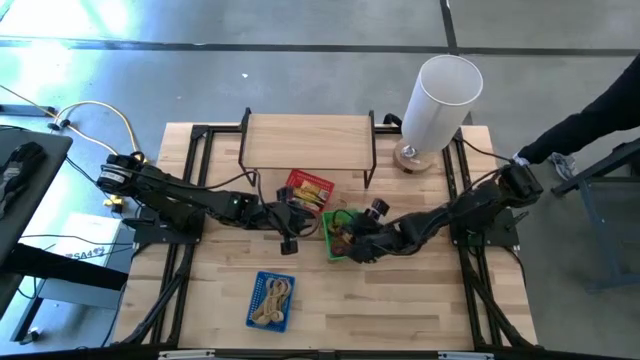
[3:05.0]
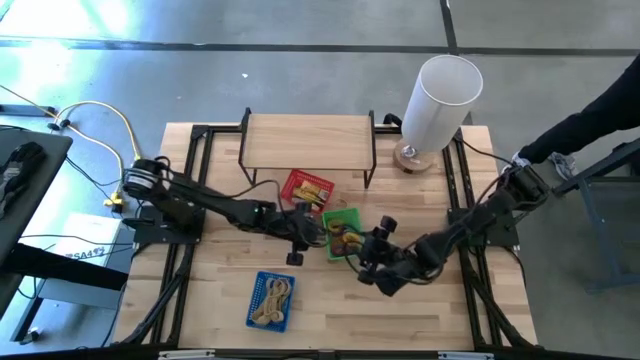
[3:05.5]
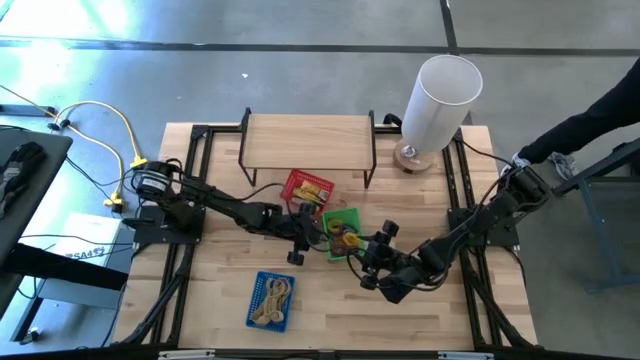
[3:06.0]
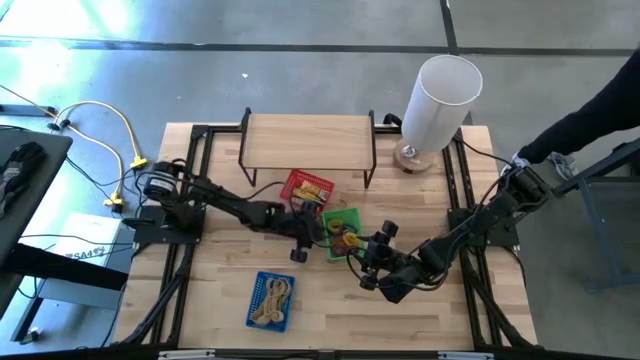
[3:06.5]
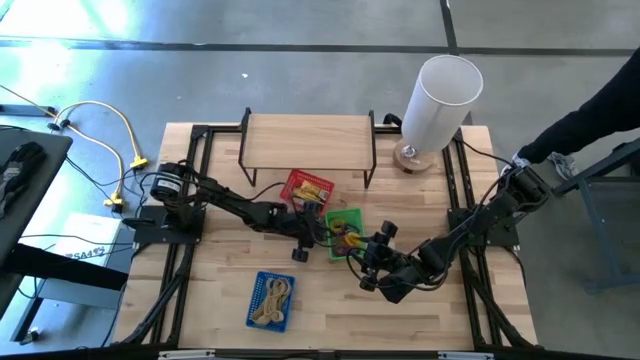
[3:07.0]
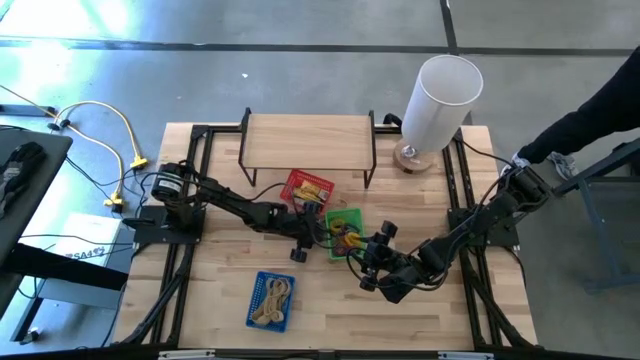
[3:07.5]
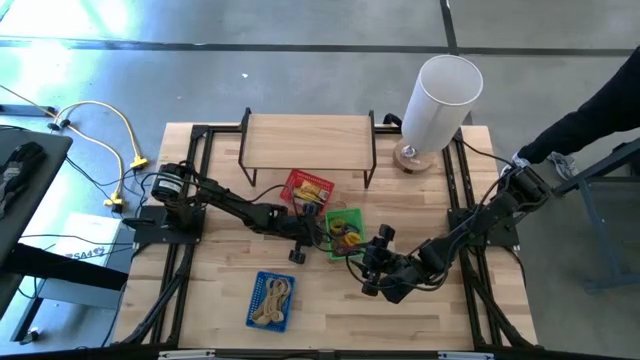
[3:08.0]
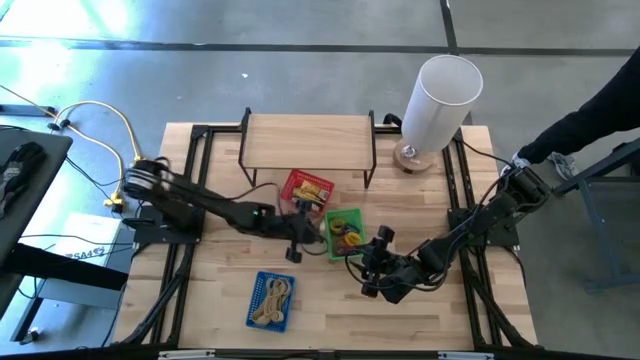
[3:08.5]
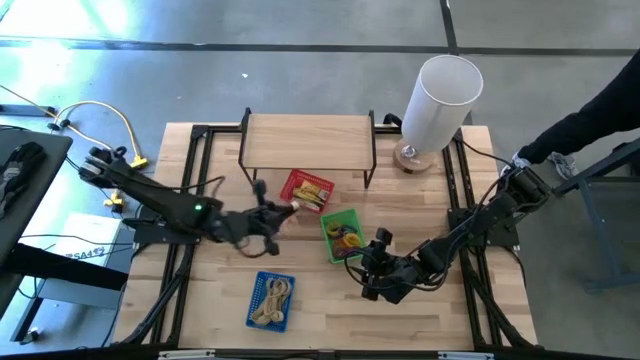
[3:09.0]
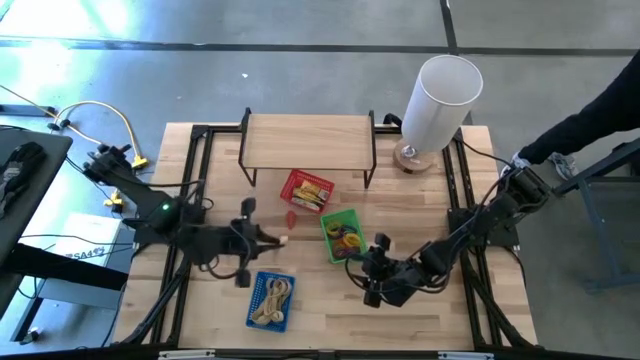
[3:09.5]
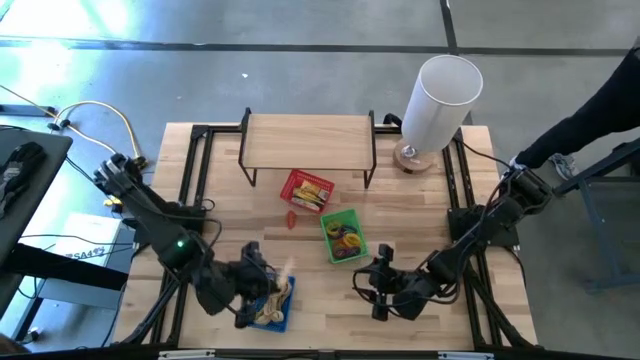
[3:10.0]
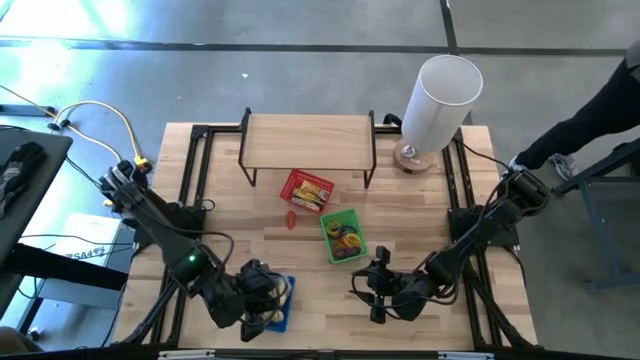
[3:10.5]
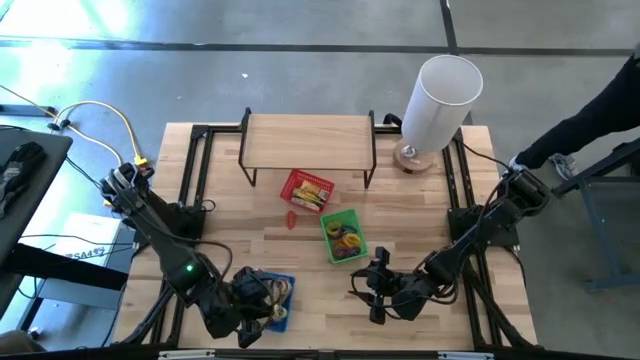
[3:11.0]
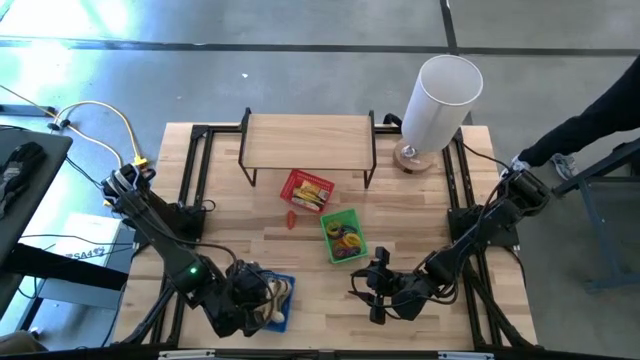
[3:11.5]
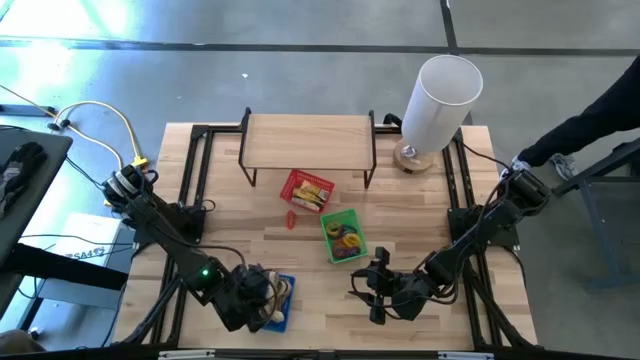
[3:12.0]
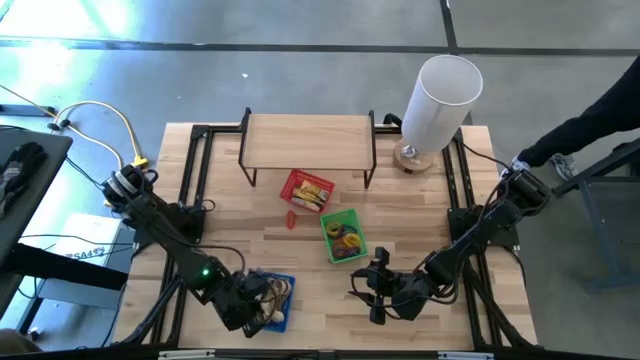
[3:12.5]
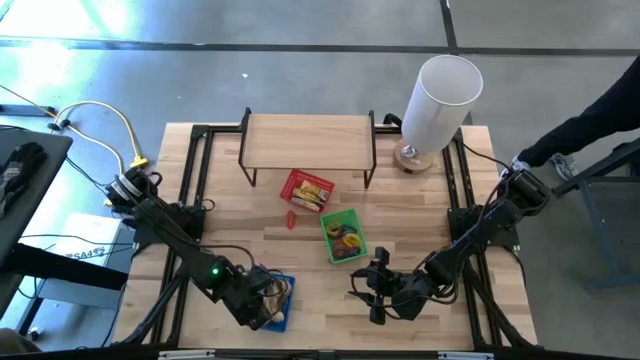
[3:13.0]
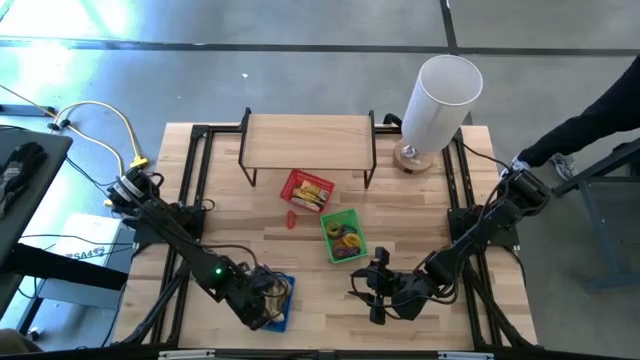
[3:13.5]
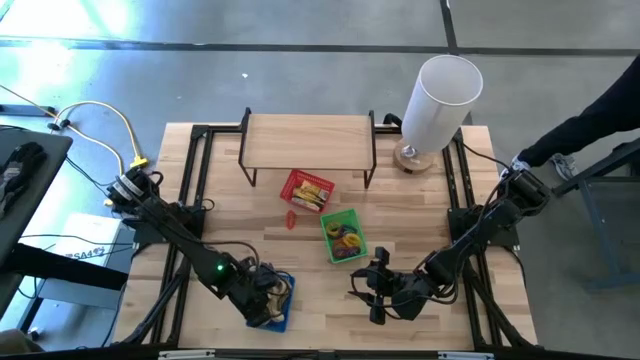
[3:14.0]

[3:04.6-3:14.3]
Task: Pick & Place Office Desk Supplies
Put the brown rubber band into the blue bin

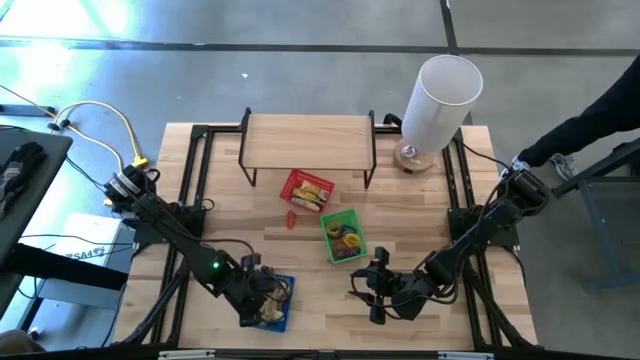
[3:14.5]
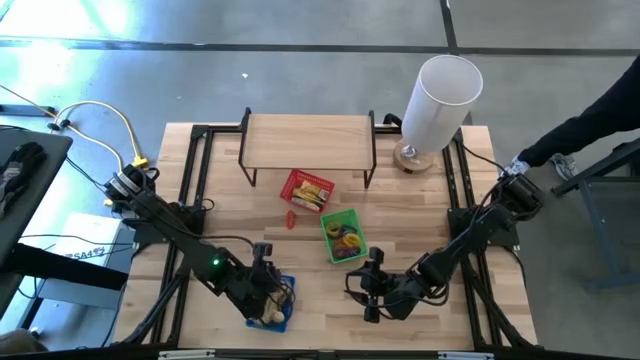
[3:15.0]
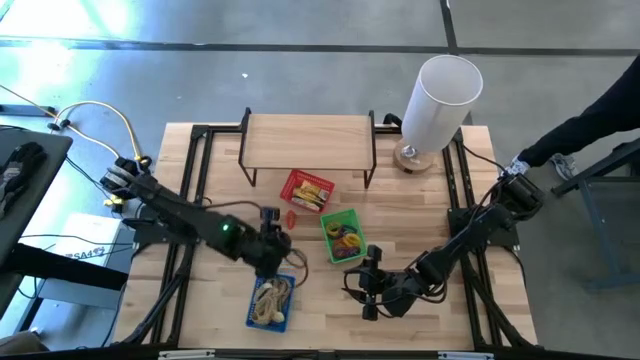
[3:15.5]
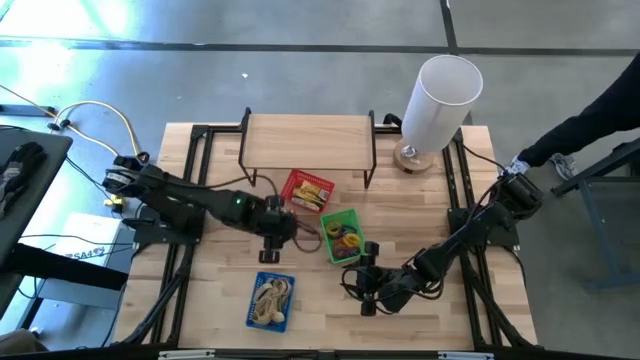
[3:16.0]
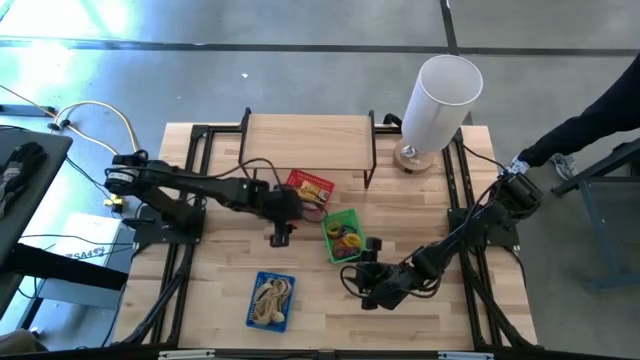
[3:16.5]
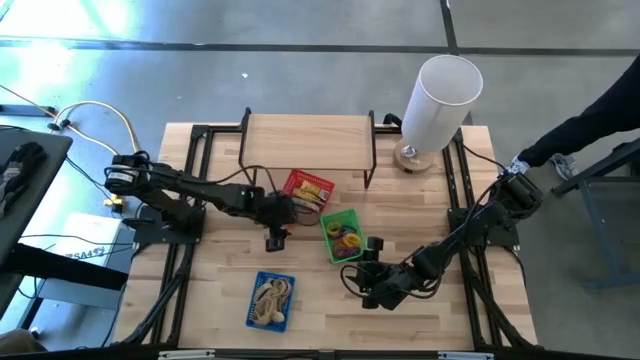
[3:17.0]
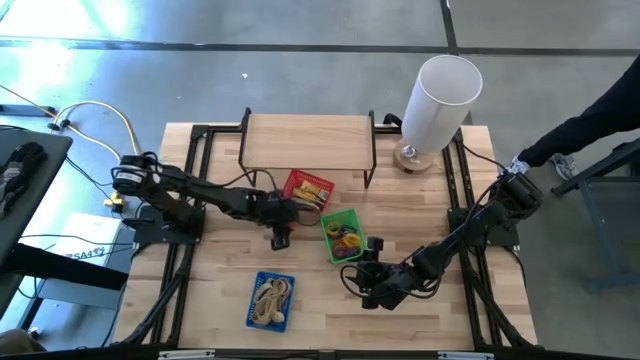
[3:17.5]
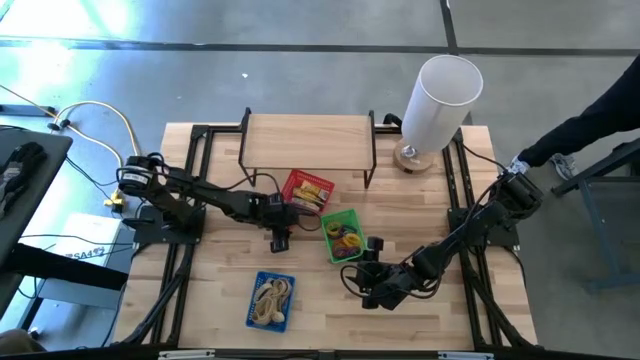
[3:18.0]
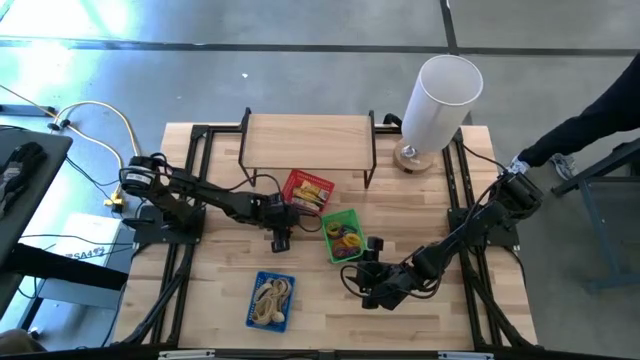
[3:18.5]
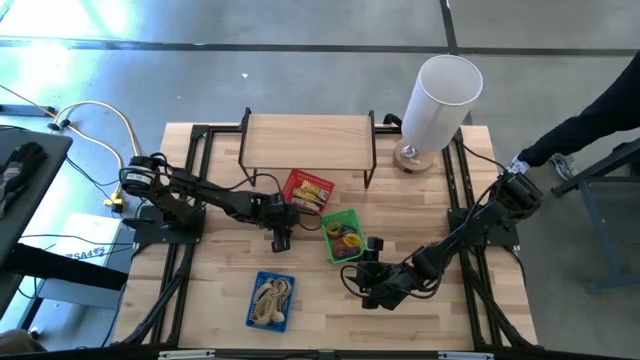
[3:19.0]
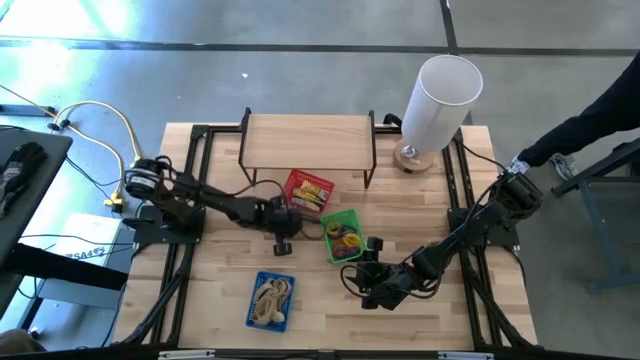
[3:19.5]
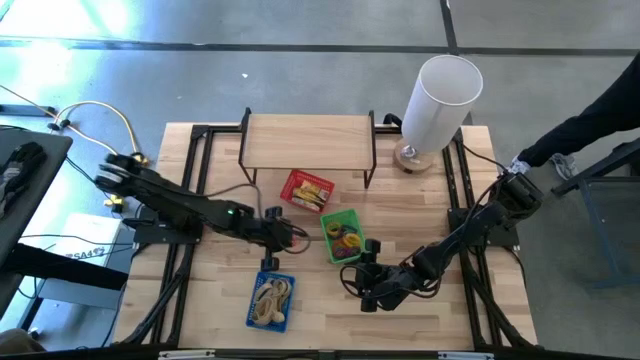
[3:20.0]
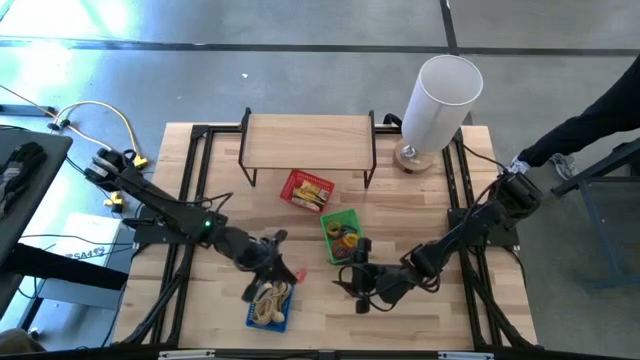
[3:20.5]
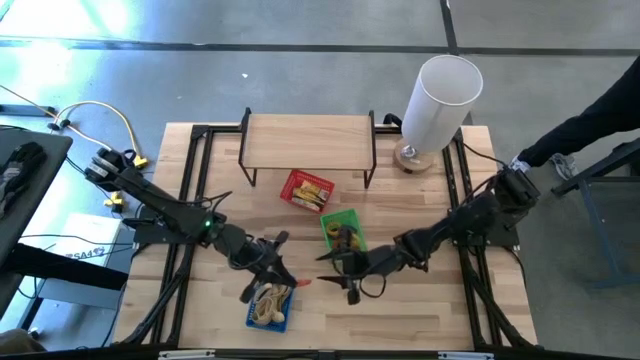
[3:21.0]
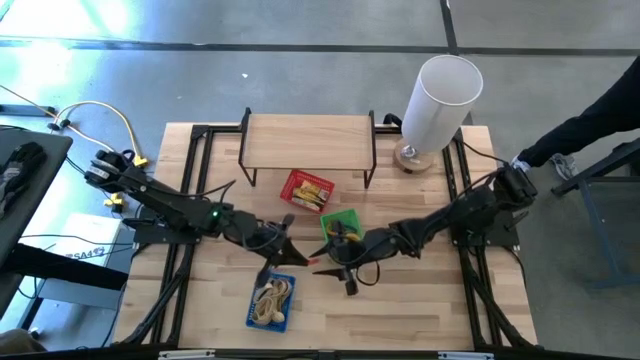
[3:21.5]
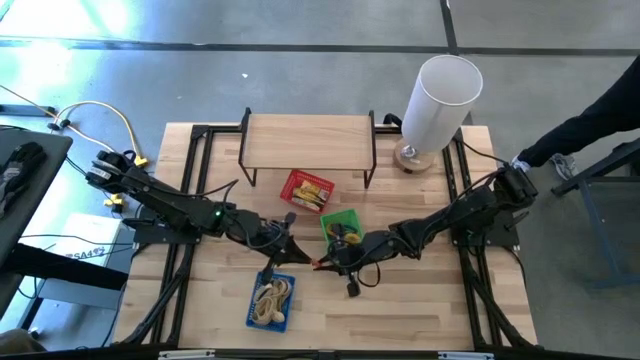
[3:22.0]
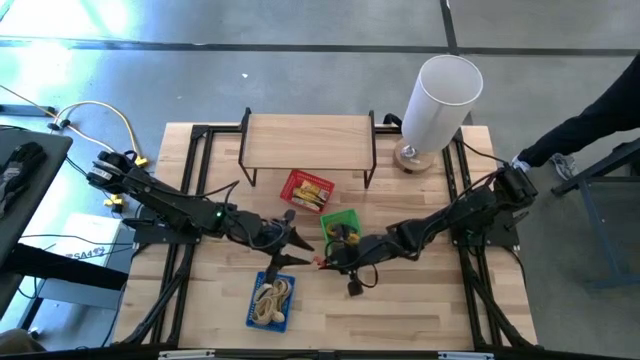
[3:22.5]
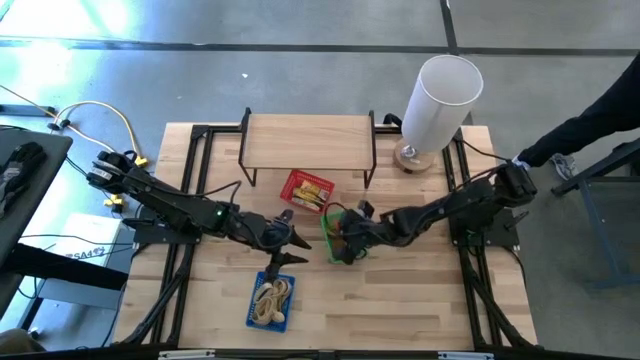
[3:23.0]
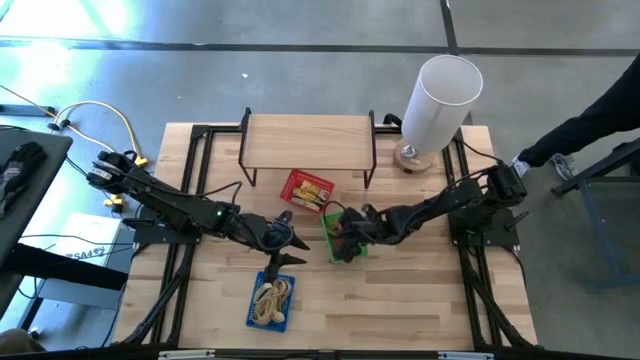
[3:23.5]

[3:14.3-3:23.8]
Put the orange spring keychain into the green bin

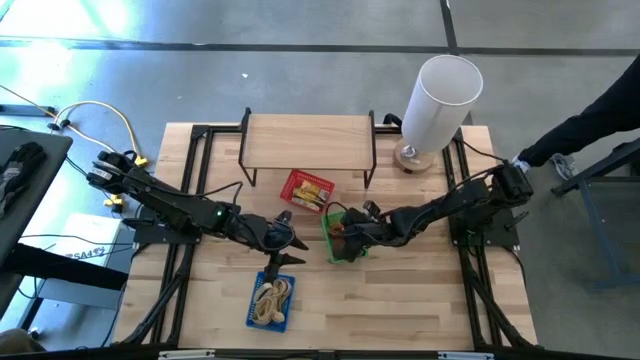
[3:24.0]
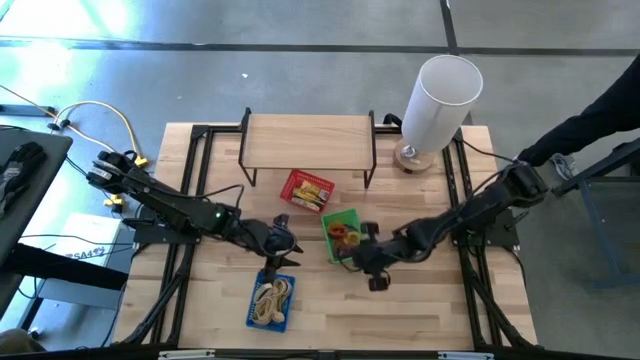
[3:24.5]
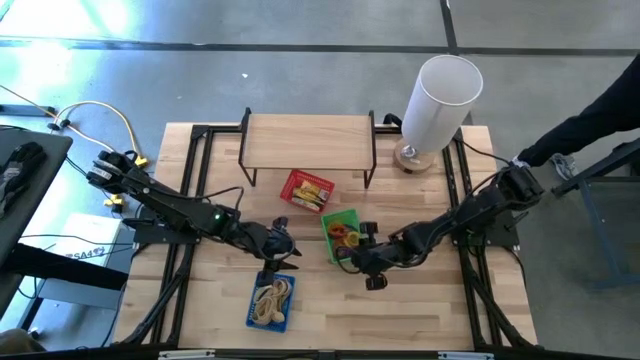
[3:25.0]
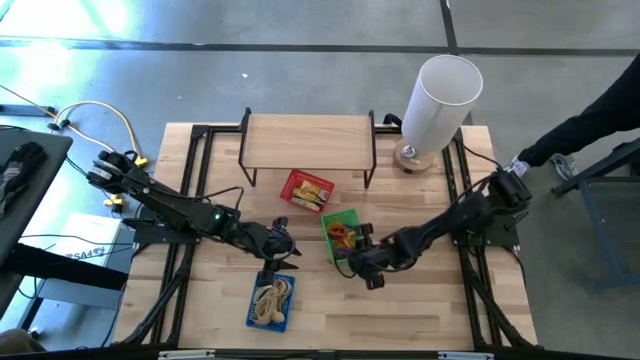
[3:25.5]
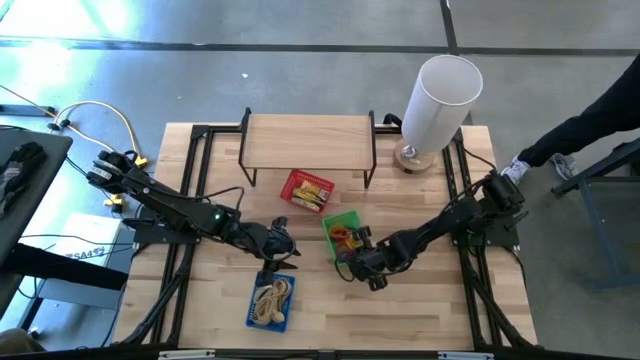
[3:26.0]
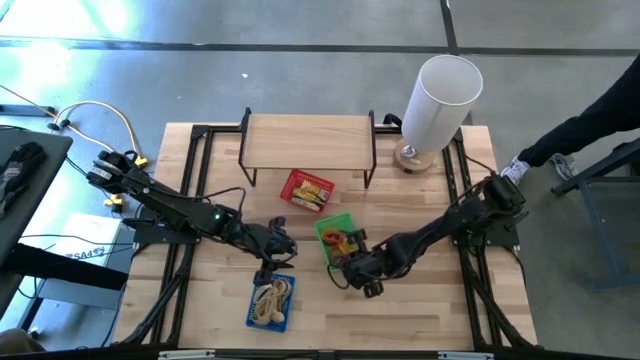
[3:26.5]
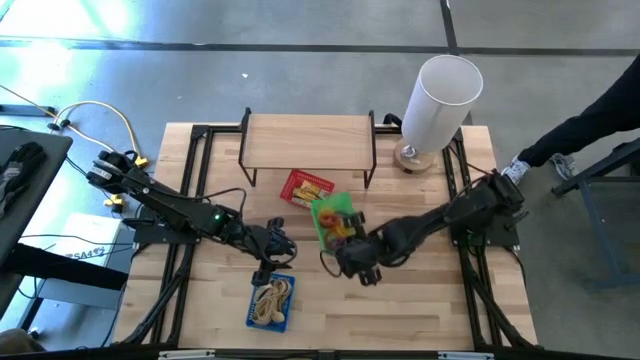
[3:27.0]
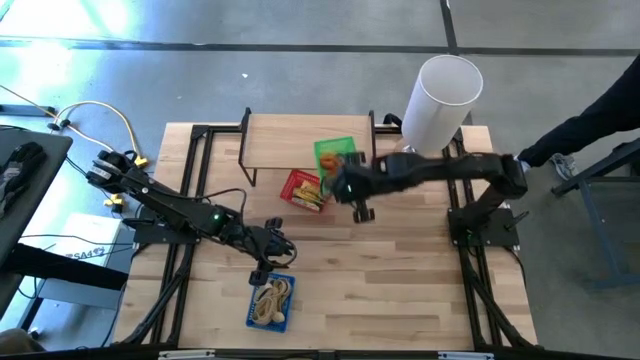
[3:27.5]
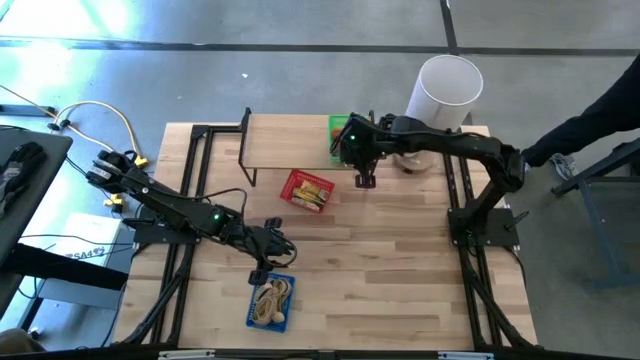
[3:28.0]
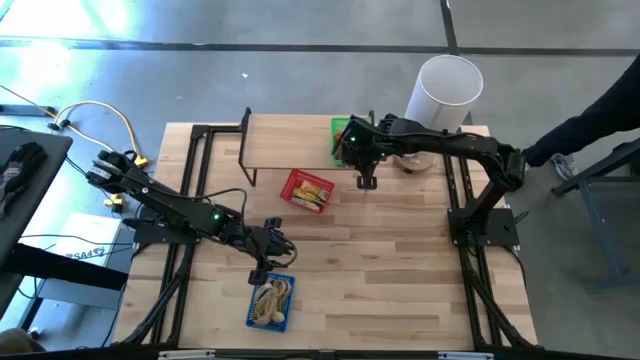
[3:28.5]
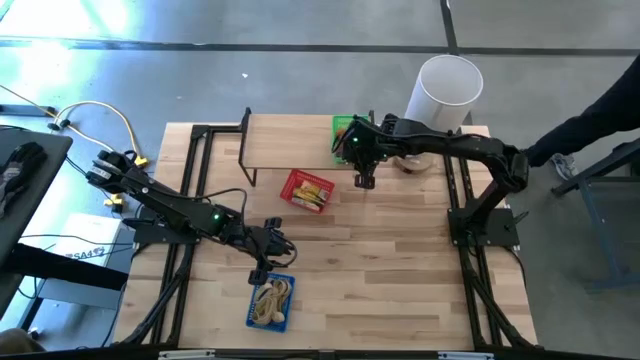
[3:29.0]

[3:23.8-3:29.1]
Put the green bin on the shelf
